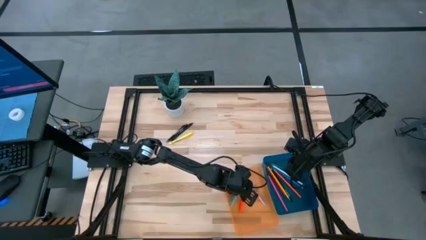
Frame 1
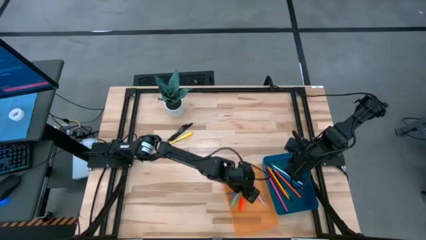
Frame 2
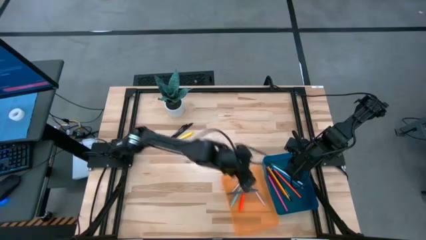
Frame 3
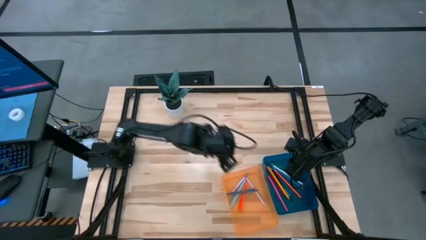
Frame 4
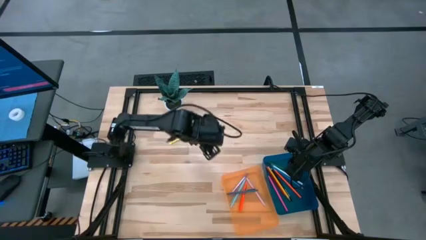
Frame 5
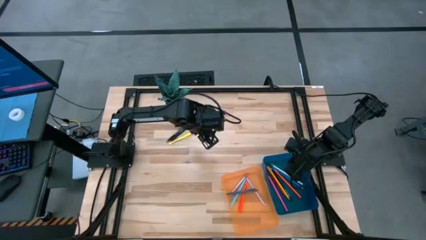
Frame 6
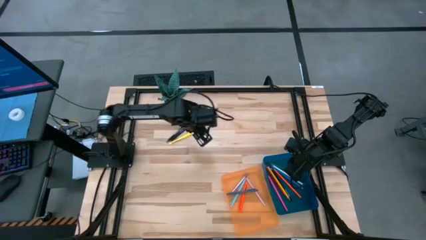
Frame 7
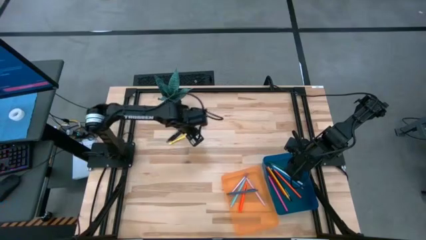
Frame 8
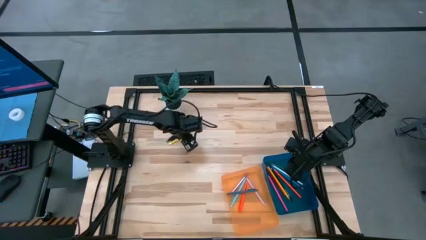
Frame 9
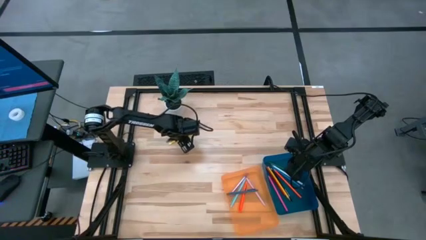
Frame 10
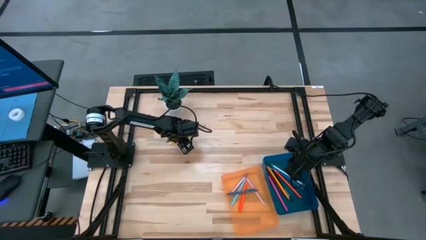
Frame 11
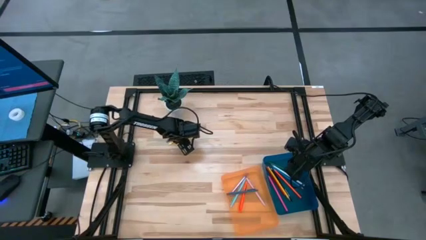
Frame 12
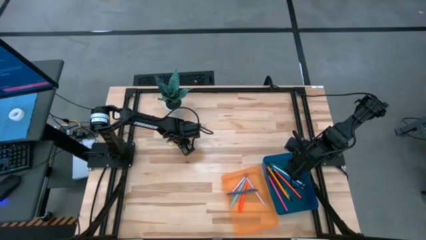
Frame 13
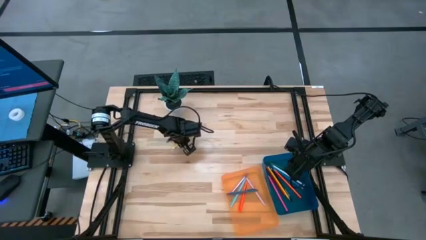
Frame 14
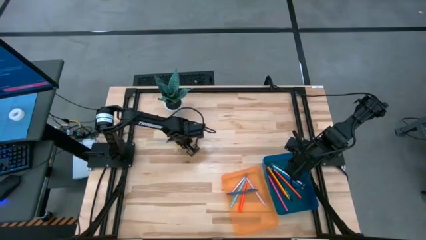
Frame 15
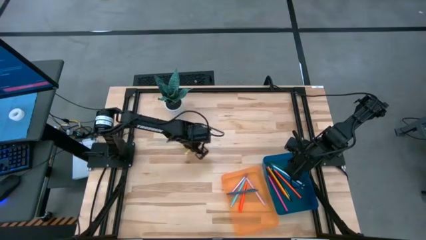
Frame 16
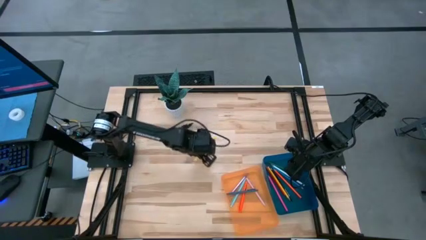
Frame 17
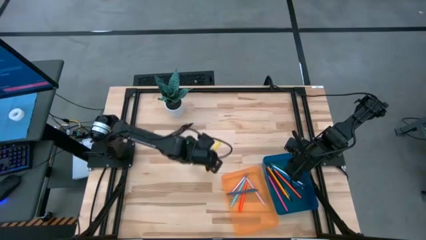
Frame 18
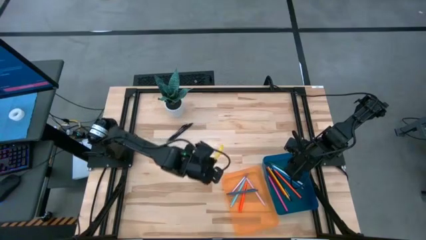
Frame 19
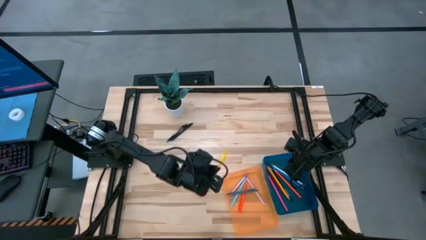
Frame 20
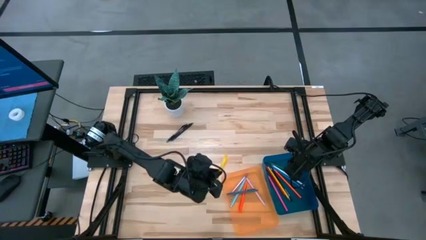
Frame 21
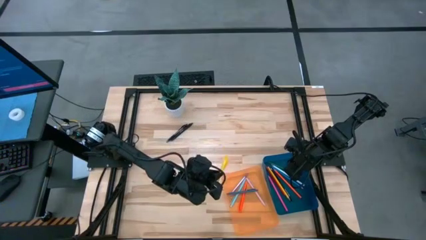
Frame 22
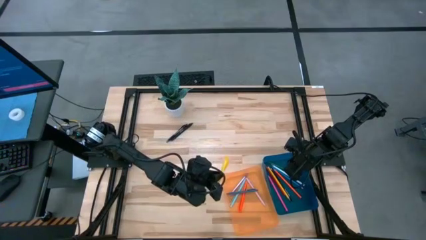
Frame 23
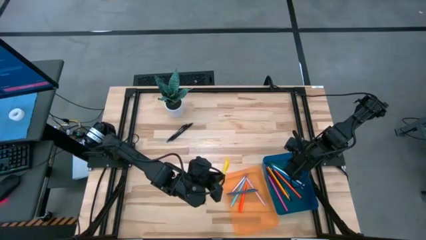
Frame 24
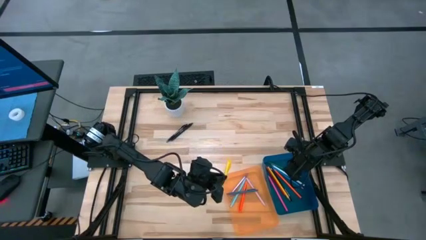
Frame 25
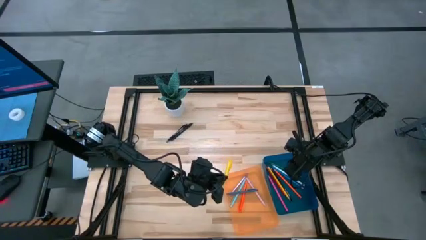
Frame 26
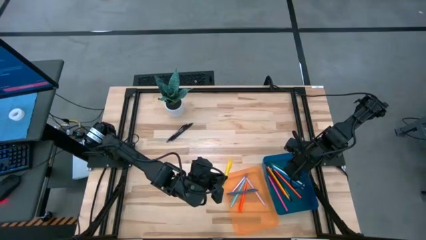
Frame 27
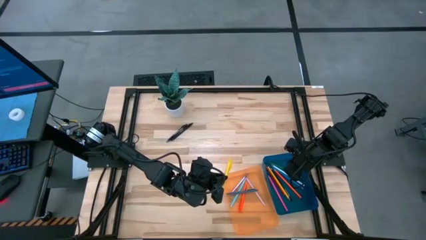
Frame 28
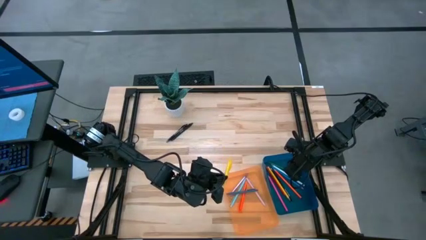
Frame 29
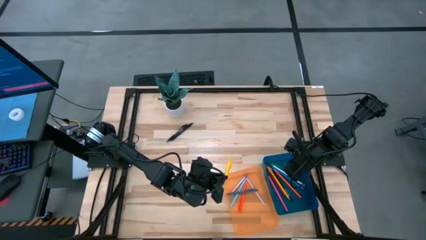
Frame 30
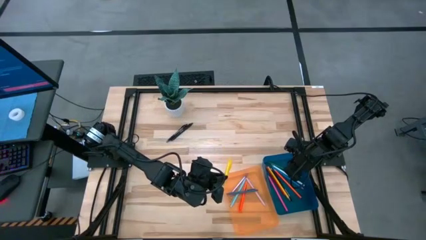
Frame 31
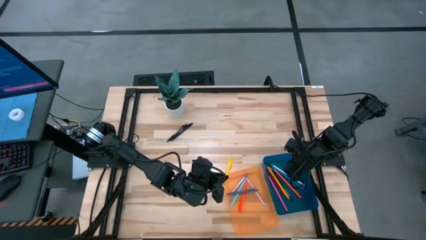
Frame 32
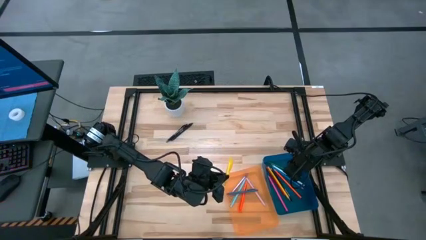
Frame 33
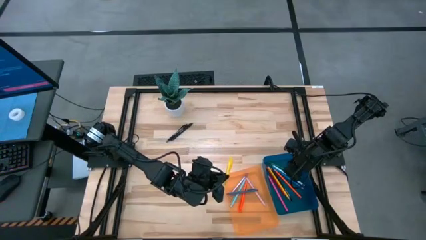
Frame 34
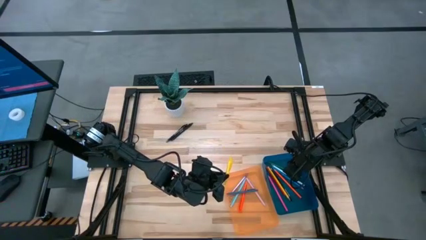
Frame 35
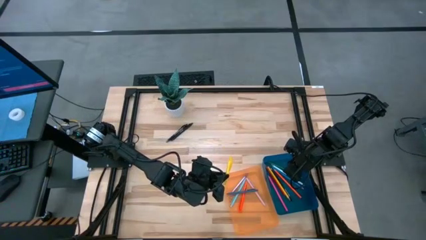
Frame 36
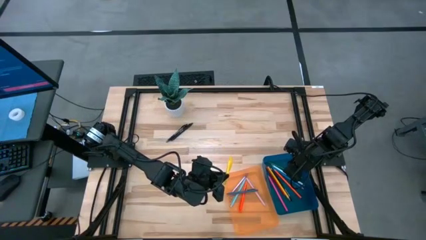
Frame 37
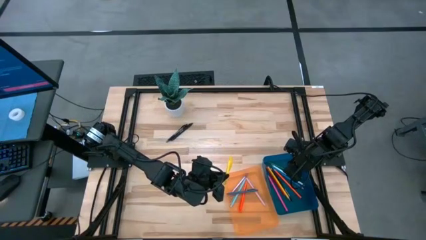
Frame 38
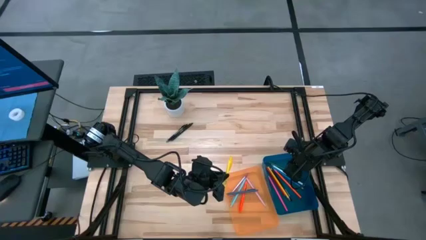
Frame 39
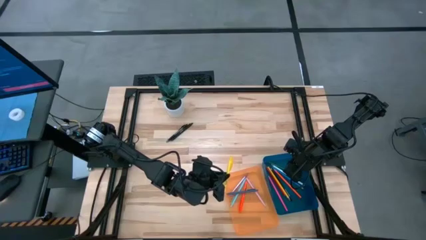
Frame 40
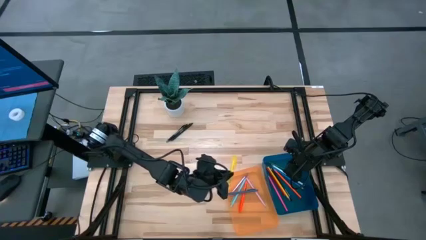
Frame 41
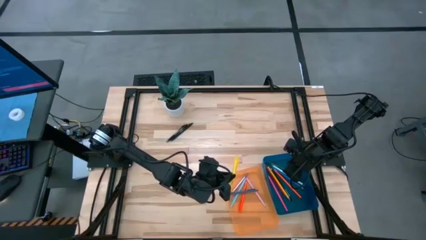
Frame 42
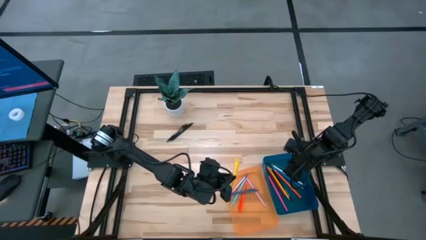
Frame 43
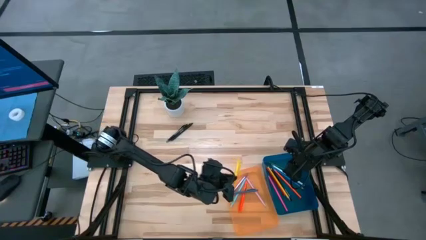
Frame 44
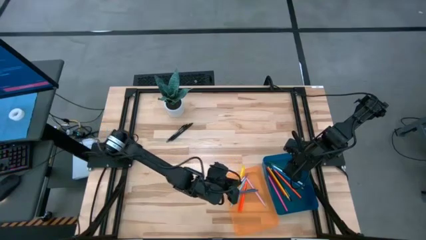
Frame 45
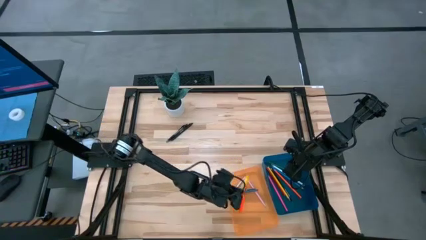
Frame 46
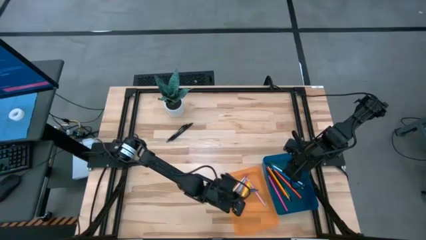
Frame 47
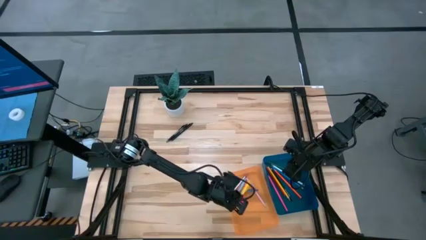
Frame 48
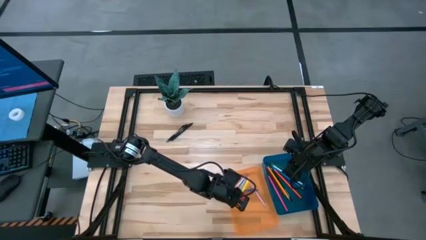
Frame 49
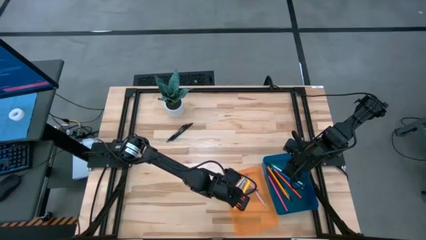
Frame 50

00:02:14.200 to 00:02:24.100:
Task: Sort pens & pencils
Put the yellow pen into the orange bin

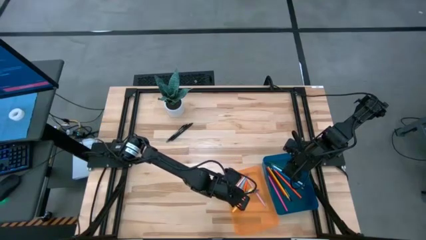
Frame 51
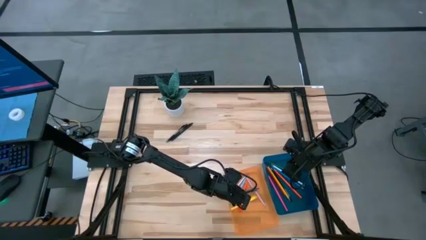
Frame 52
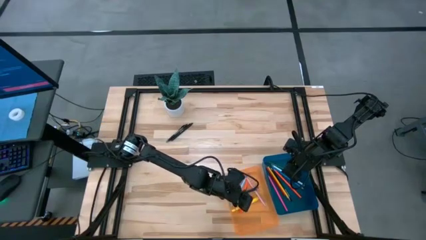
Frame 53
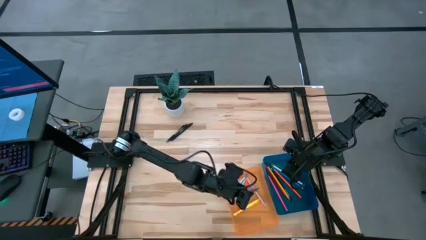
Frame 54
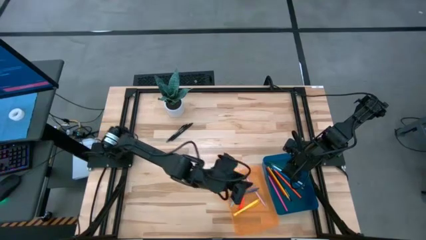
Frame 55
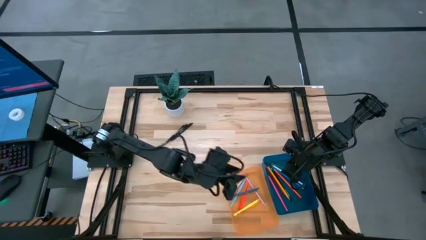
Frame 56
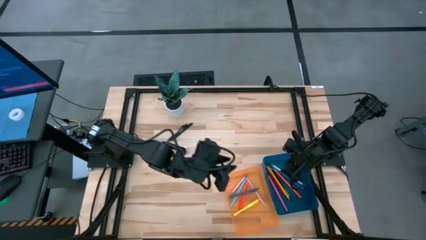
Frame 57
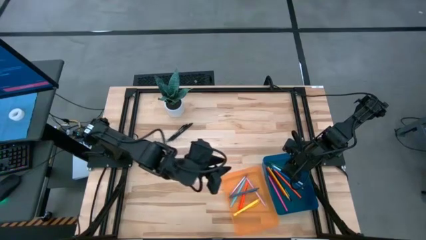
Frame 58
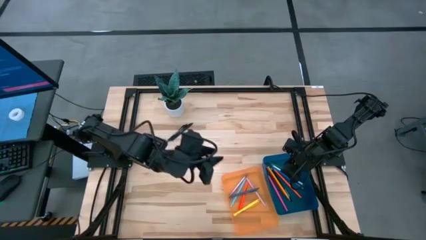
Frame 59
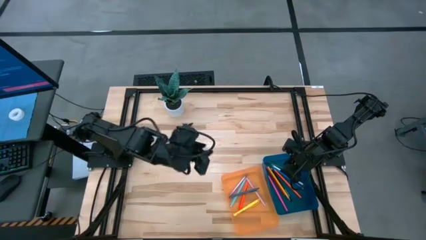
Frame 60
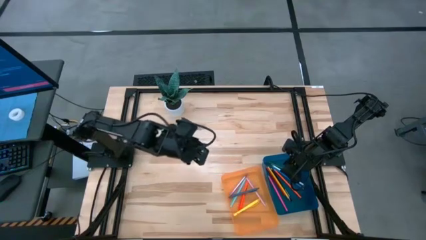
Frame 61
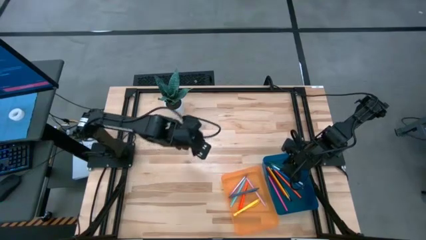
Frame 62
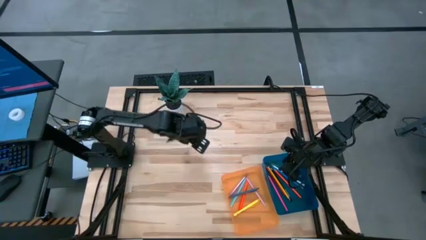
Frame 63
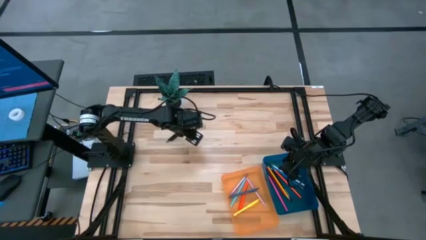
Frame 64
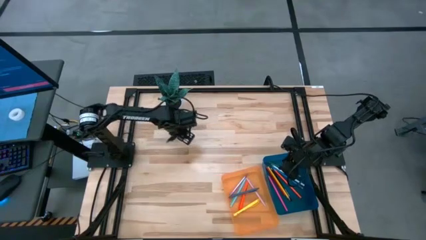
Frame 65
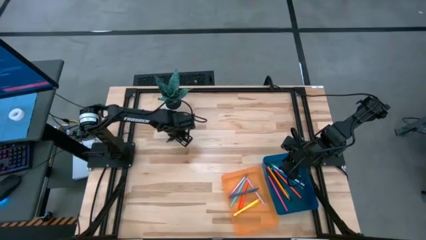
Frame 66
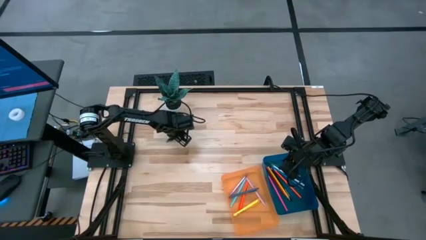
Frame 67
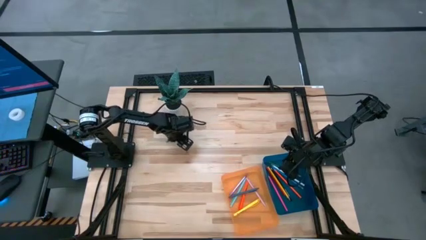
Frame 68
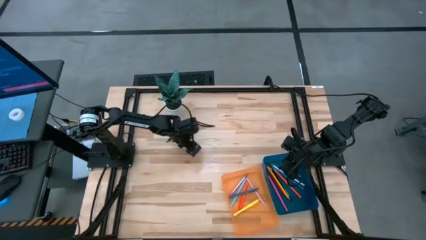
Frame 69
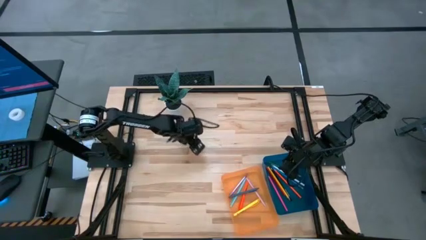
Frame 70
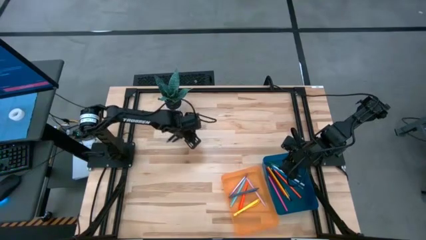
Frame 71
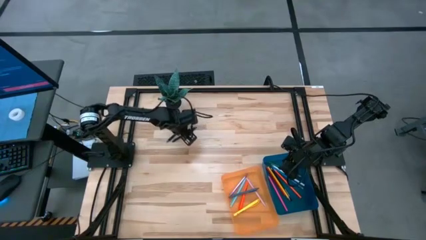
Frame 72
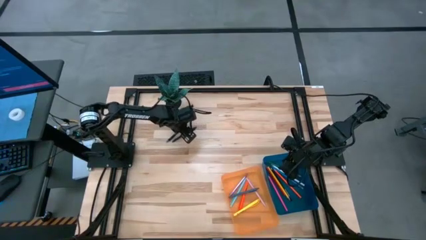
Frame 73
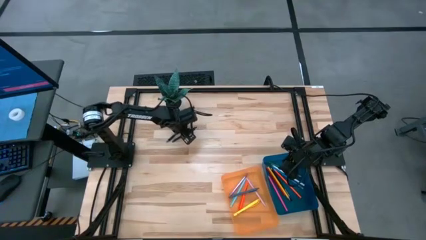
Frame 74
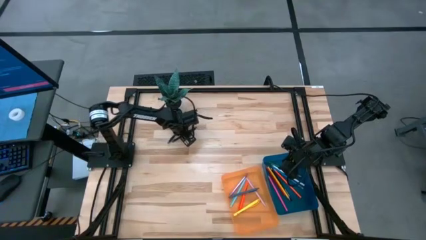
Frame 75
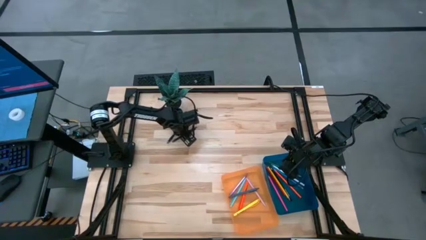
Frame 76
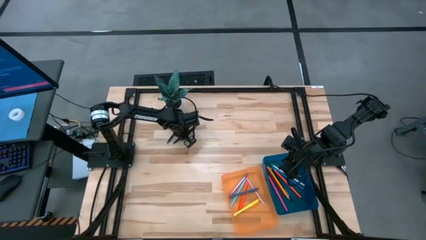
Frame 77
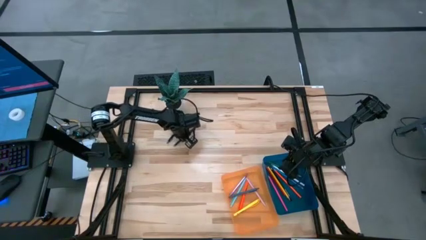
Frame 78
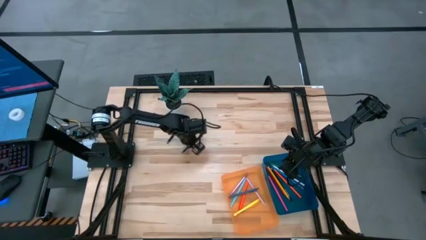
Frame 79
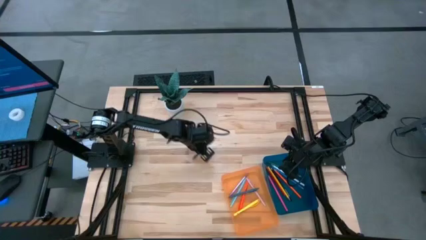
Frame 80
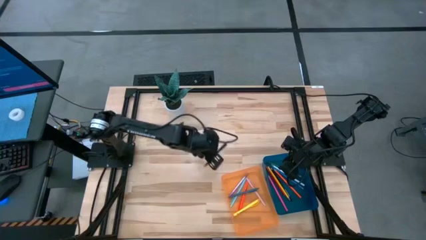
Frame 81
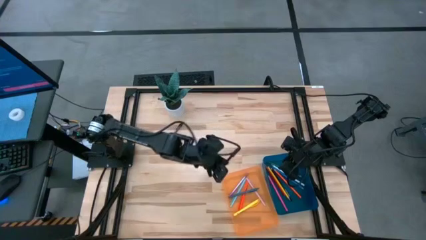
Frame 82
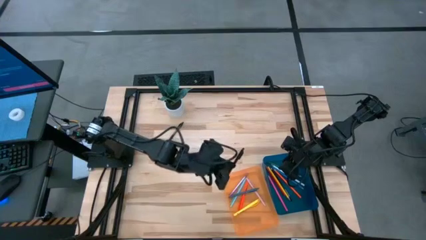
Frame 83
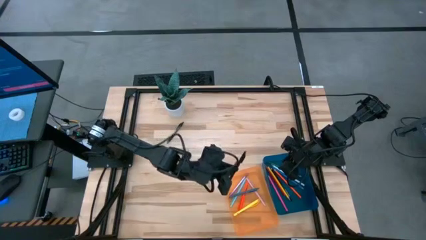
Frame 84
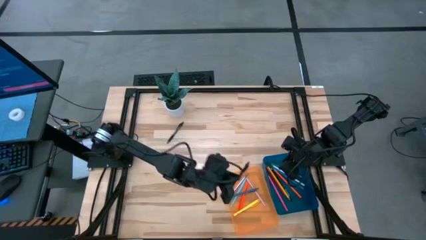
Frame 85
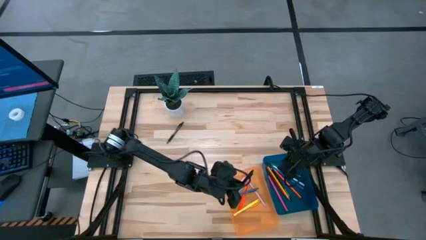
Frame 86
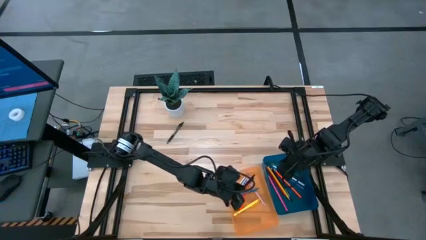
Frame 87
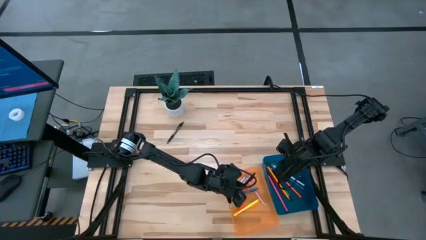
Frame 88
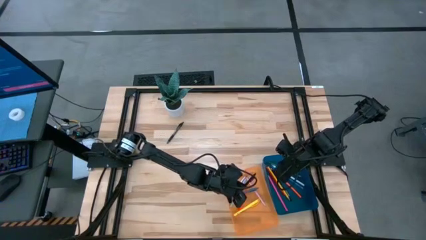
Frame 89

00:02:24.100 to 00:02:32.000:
Put the black pen into the orange bin

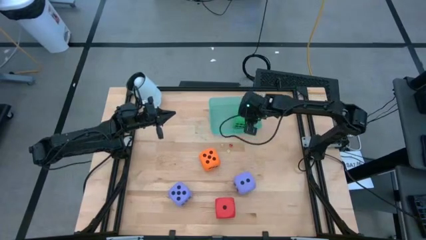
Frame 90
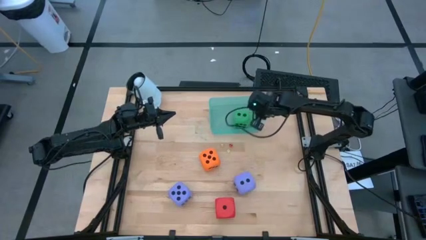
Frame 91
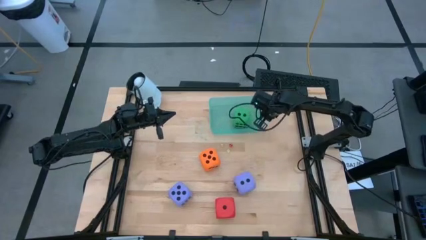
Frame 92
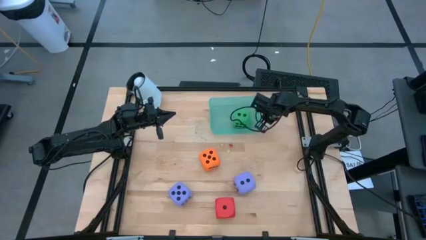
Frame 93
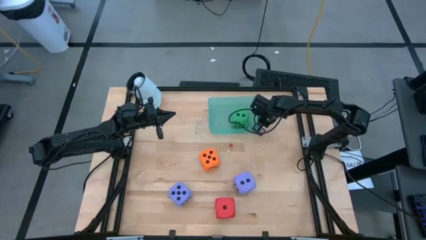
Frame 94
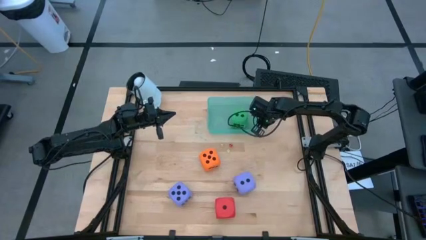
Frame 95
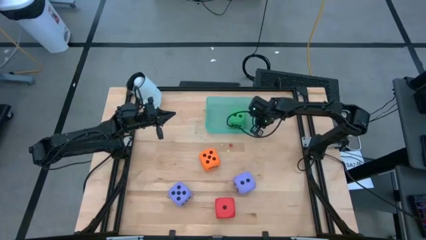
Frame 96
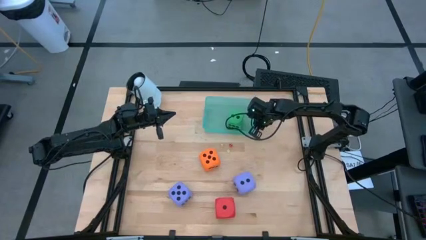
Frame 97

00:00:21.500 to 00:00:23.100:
Task: Pick & Place Dice
Adjust the light blue bin
